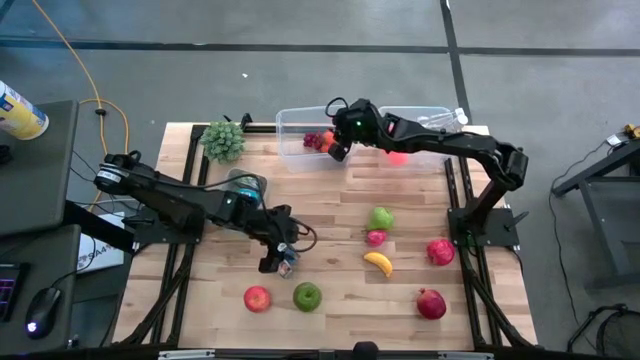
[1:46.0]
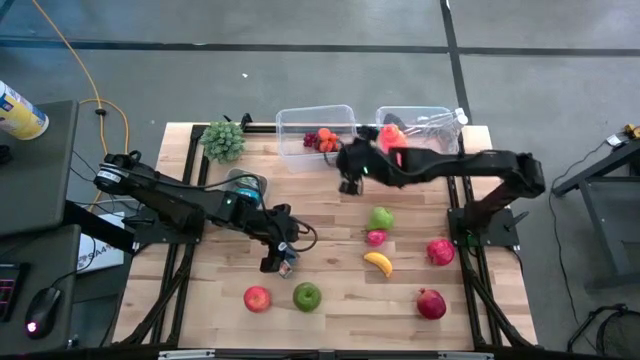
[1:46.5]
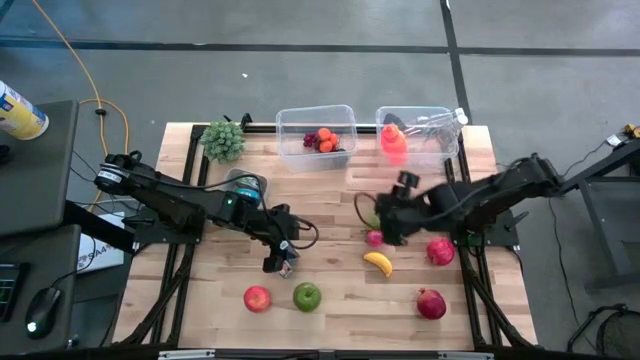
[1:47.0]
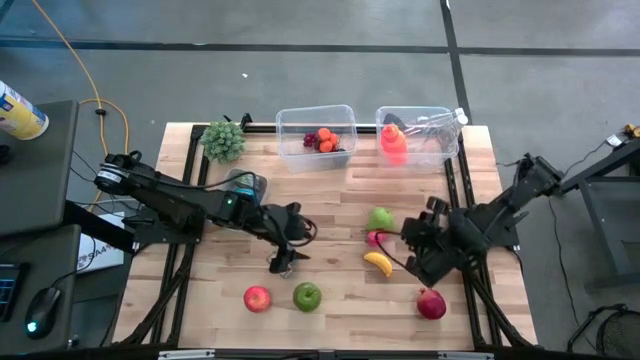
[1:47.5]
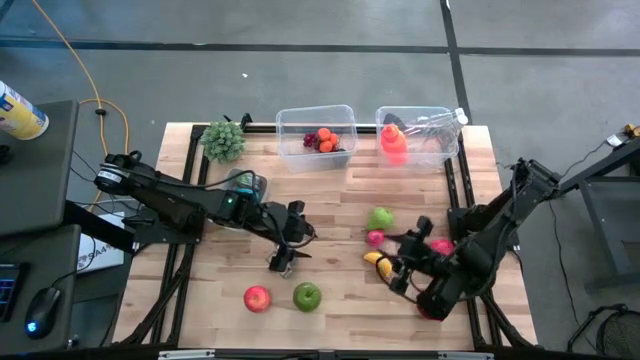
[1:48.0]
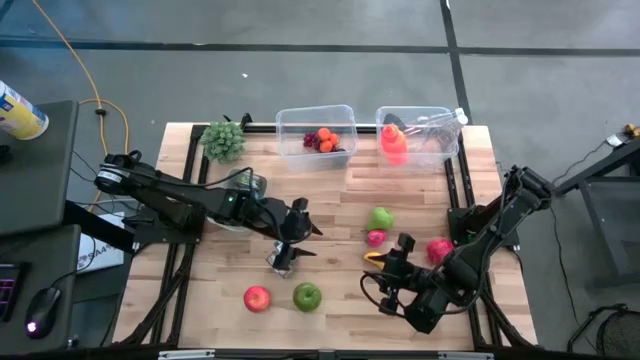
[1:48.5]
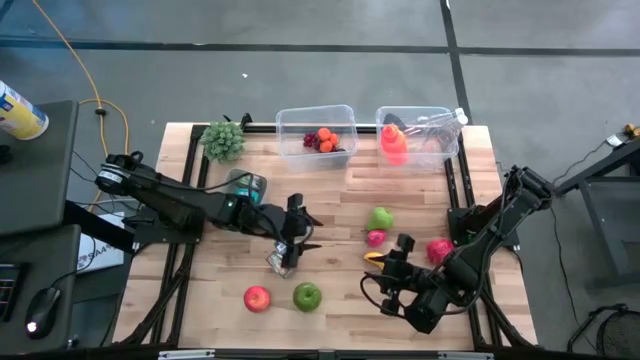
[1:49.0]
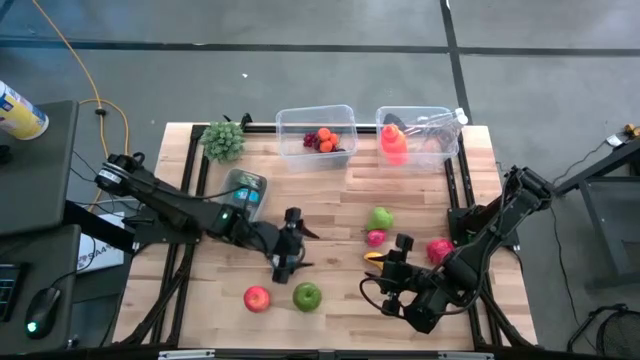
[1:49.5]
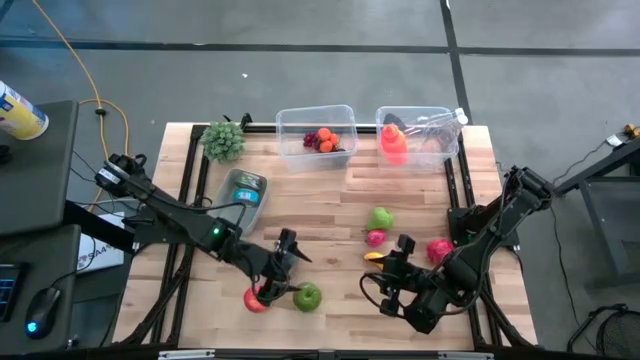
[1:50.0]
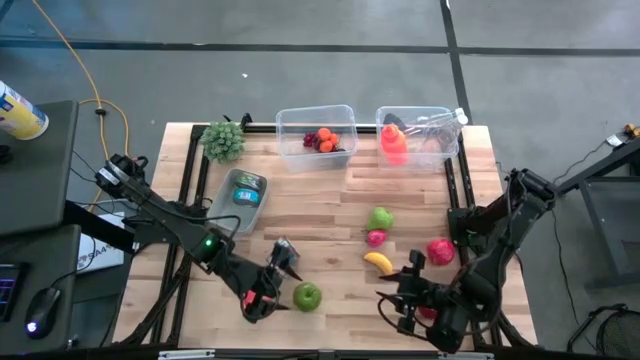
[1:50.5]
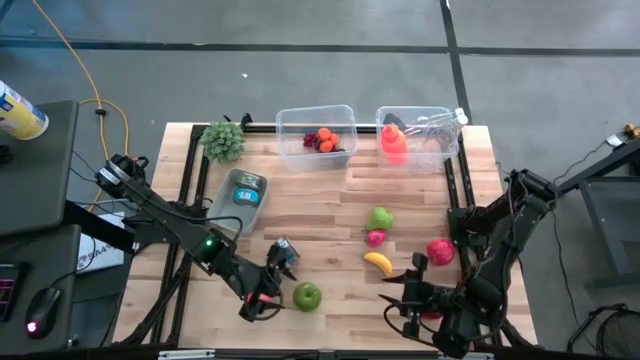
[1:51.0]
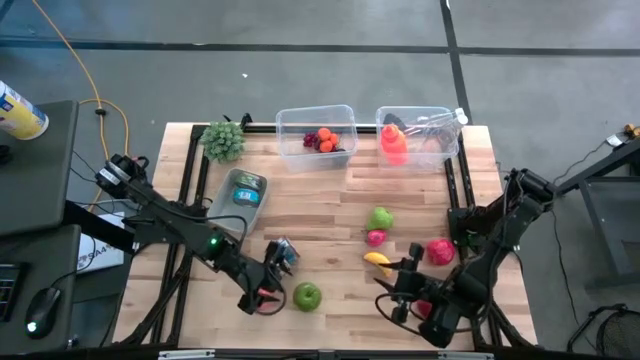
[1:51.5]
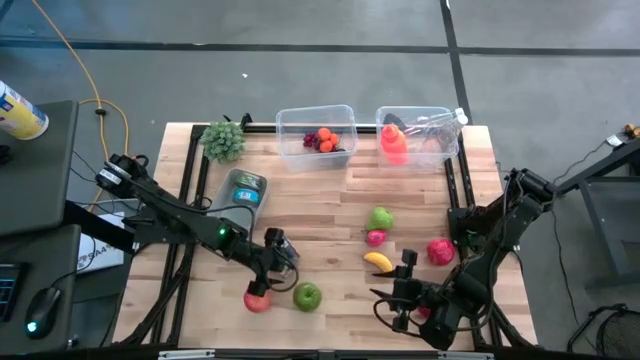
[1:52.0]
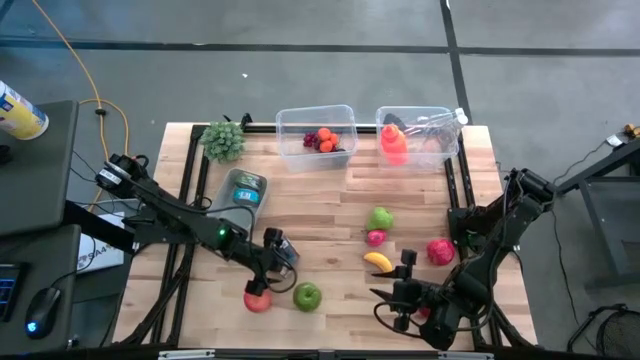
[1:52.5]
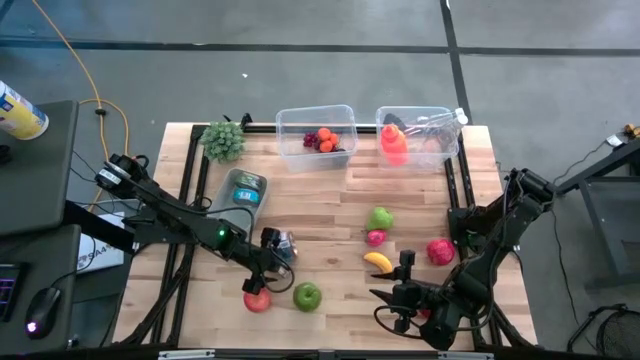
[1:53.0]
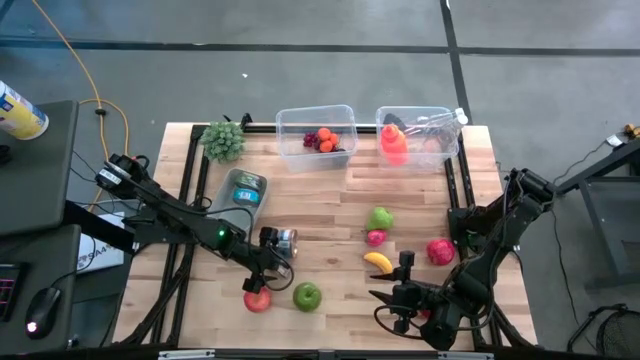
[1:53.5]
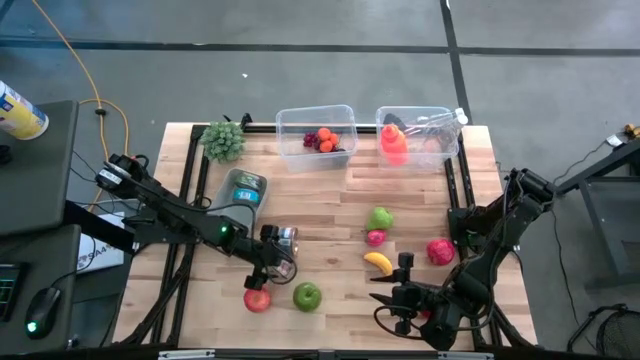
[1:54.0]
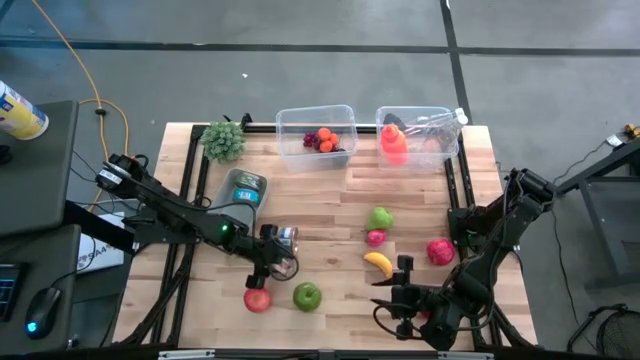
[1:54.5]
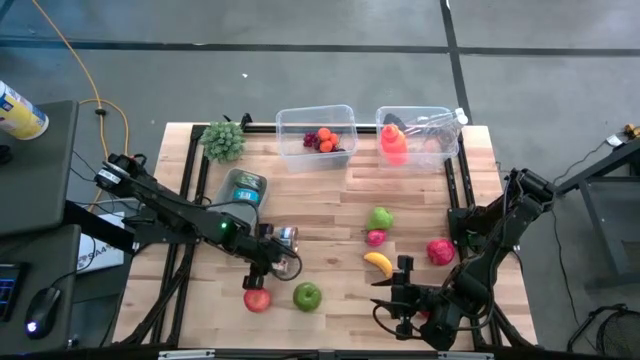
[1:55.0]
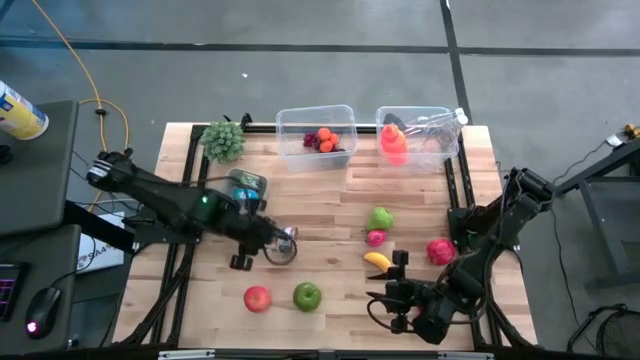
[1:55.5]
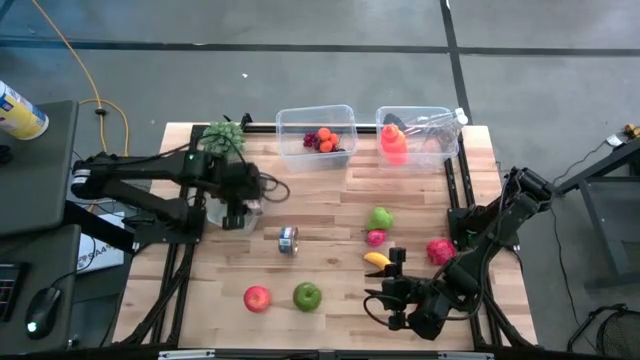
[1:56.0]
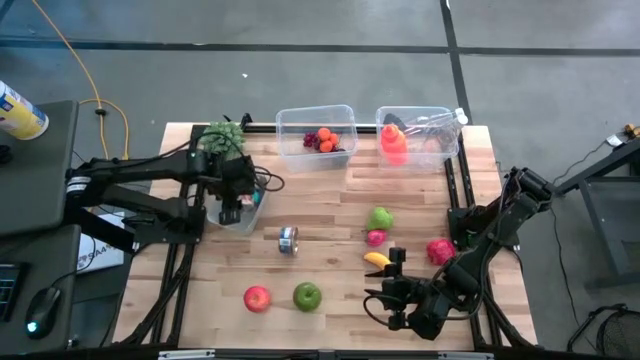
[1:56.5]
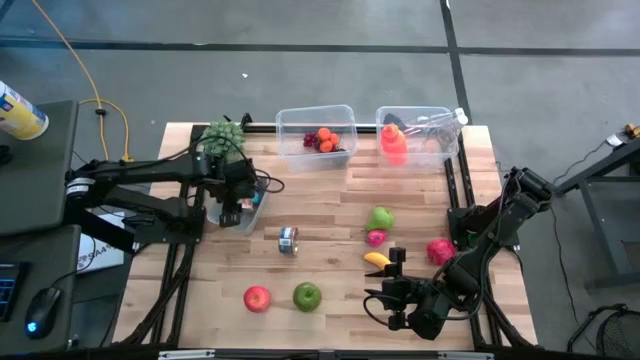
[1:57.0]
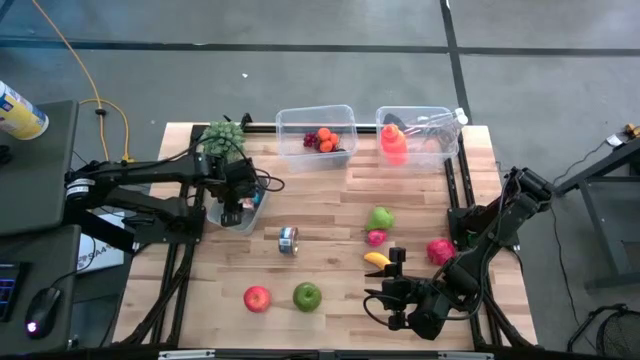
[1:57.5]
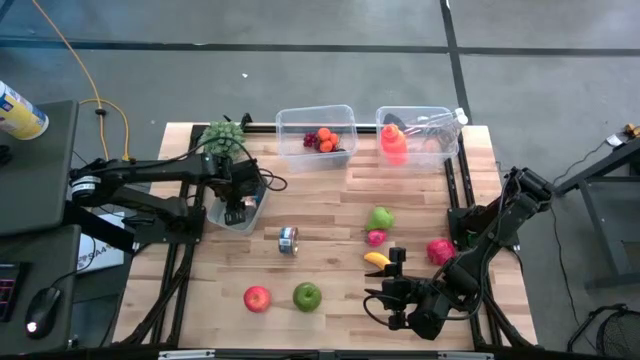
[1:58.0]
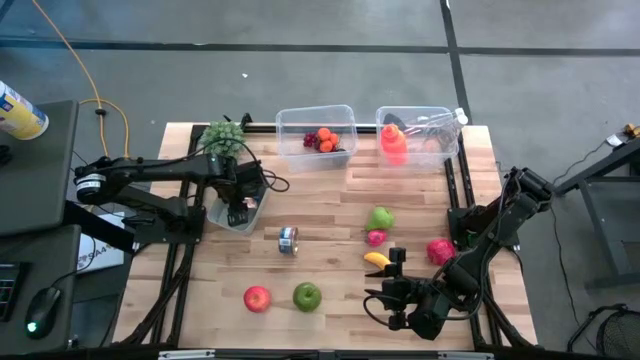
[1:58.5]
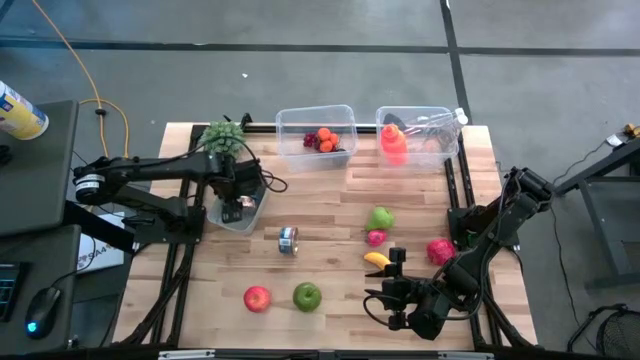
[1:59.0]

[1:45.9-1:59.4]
Task: Pick & Place Food Item
Put the green tuna can into the grey bin

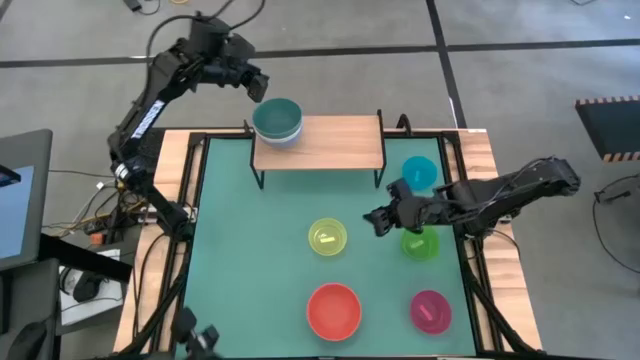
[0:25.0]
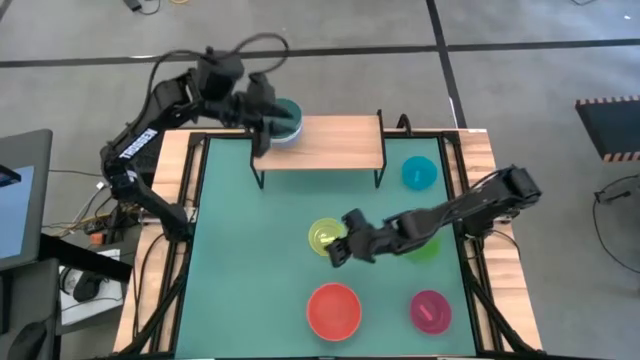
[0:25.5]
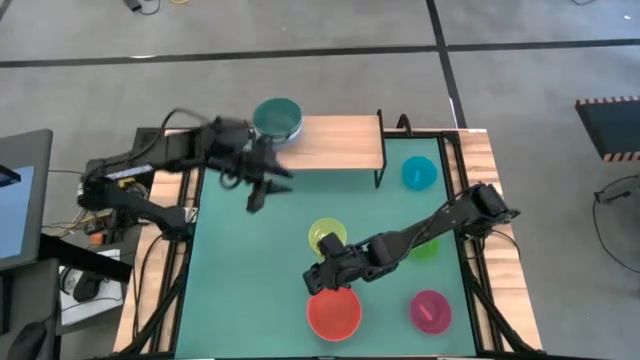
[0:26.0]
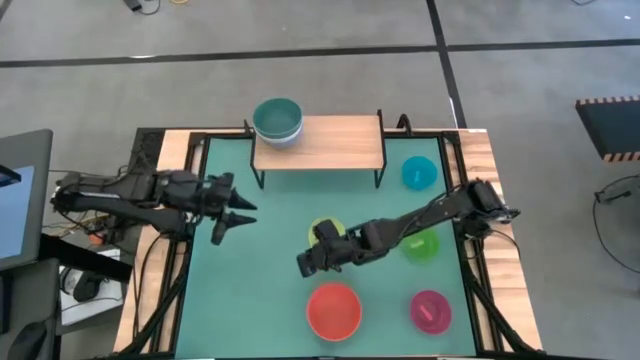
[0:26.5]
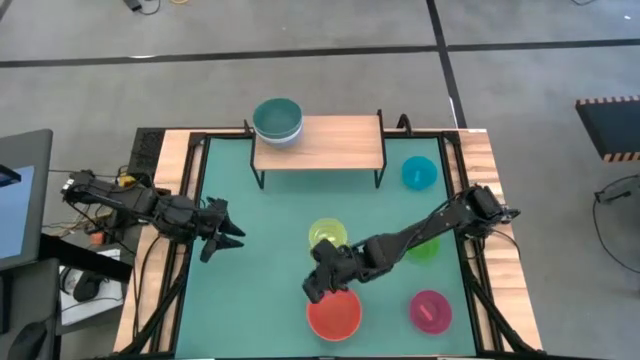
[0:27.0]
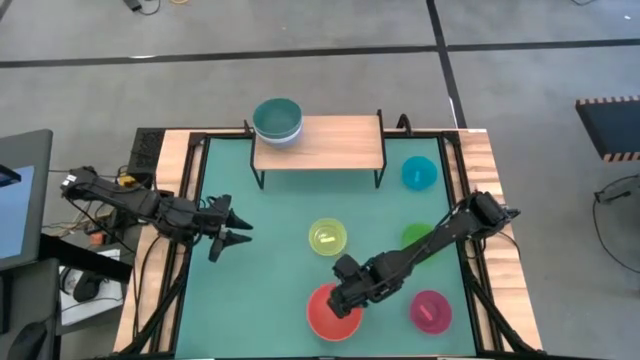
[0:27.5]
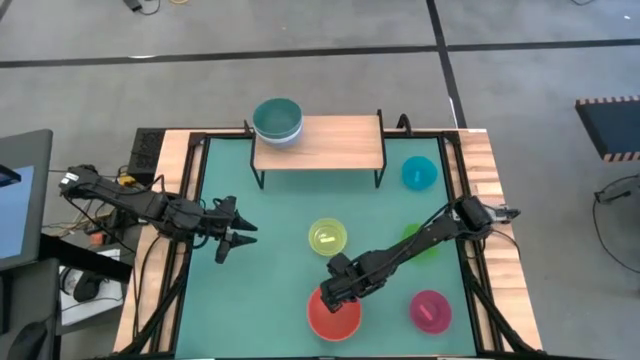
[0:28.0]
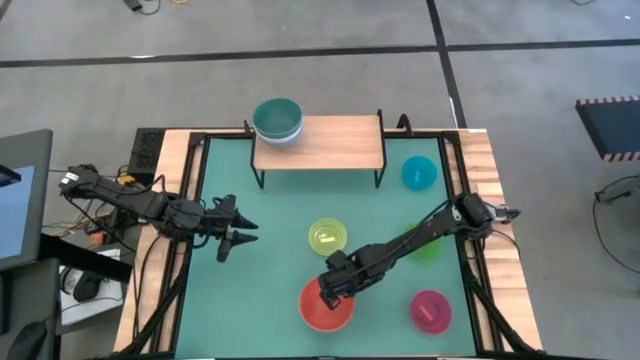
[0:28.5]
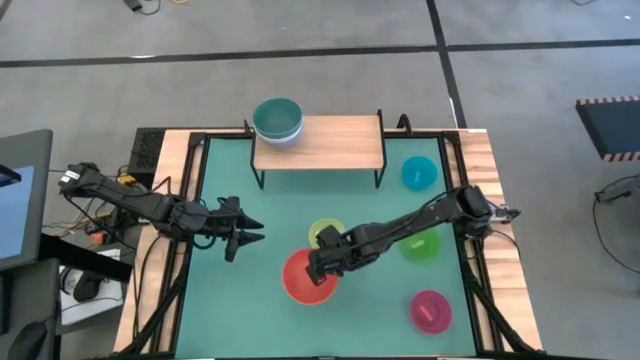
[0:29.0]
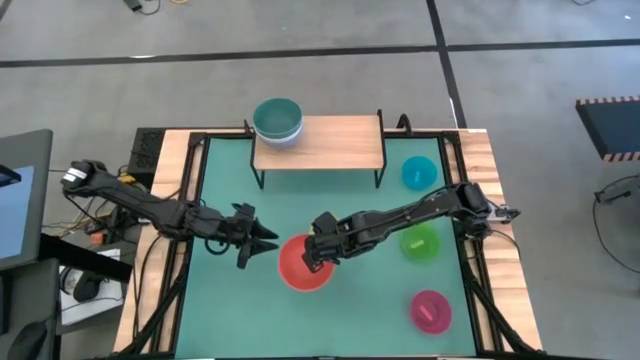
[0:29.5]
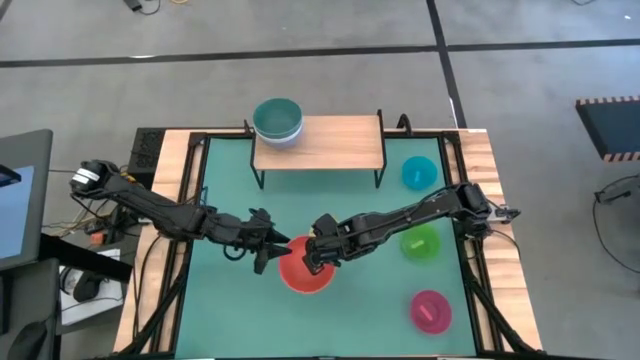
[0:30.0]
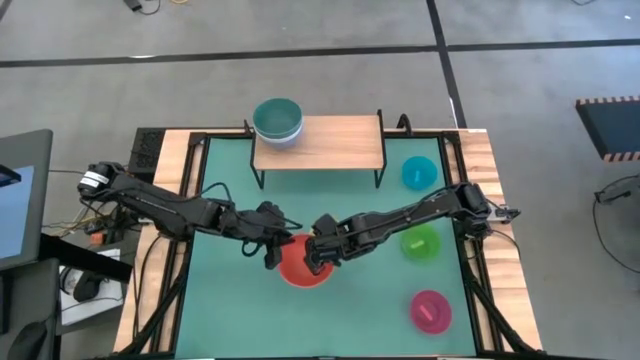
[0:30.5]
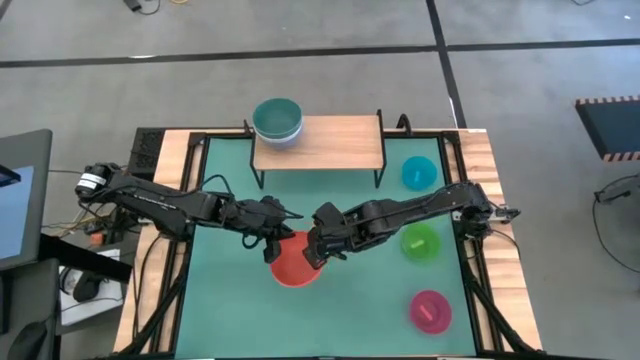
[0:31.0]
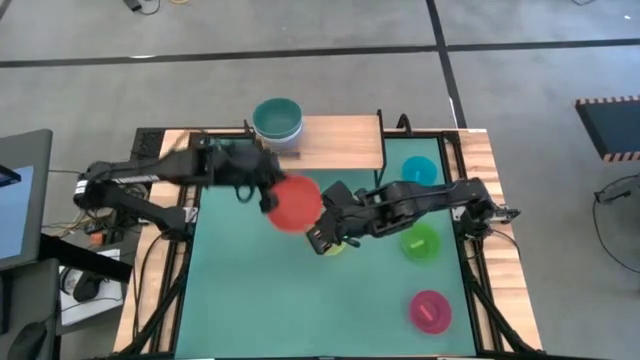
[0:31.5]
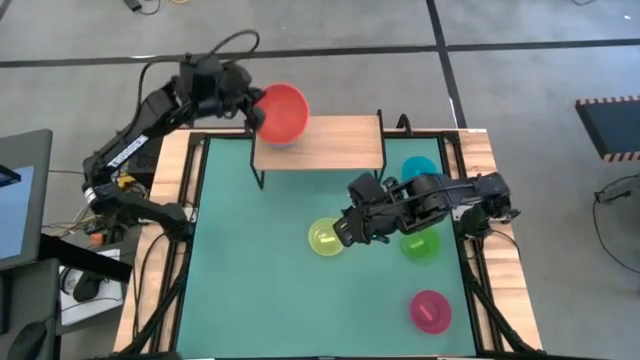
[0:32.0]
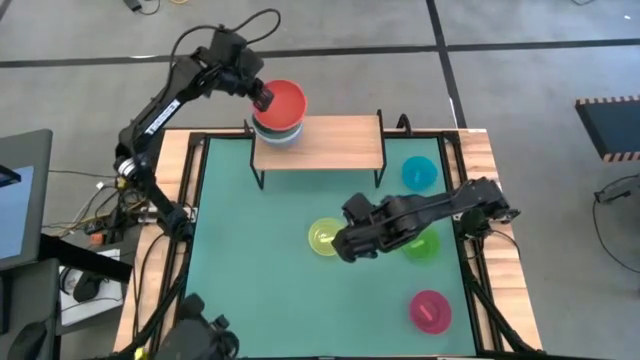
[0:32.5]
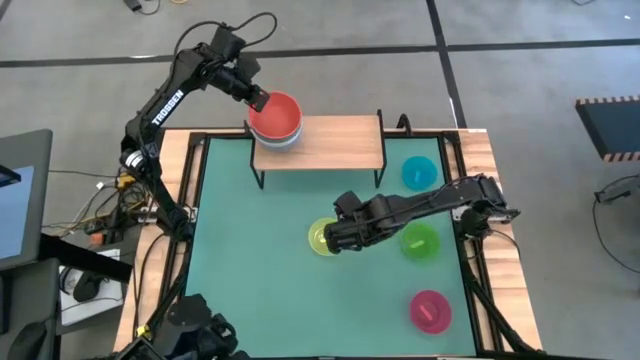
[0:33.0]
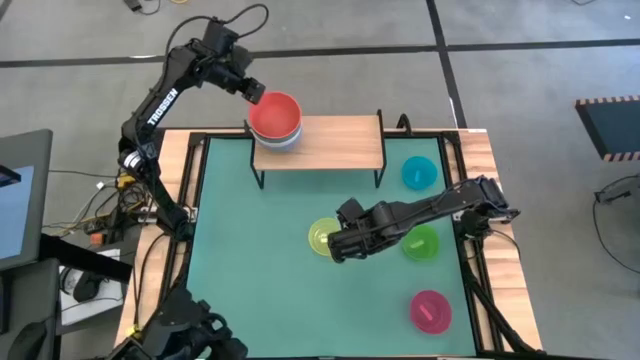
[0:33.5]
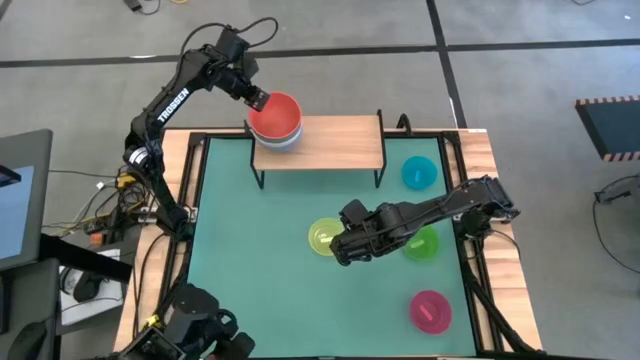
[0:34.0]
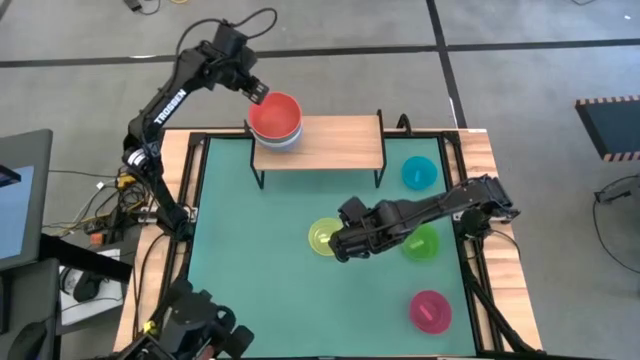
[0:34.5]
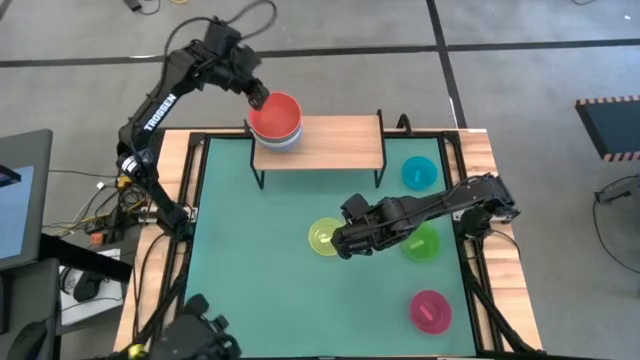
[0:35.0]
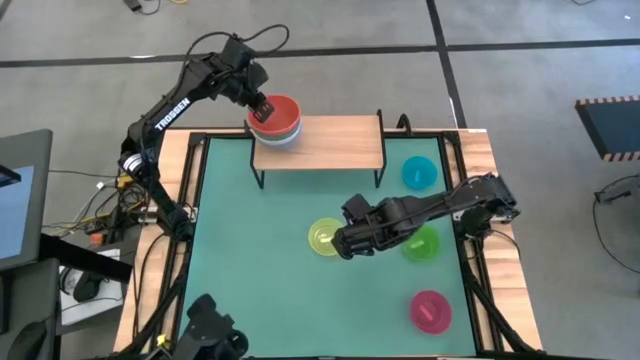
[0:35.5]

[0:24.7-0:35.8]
Task: Place and stack bowls onto a shelf
Stack the orange bowl on top of the green bowl on the shelf
